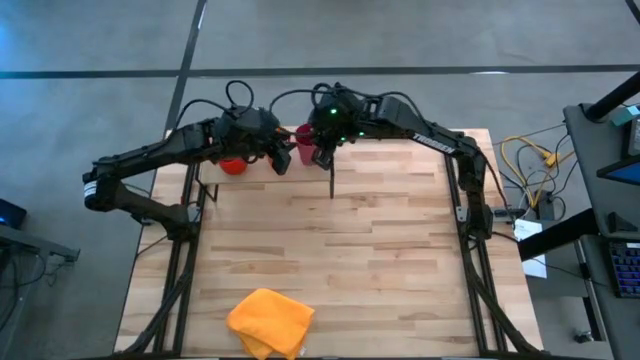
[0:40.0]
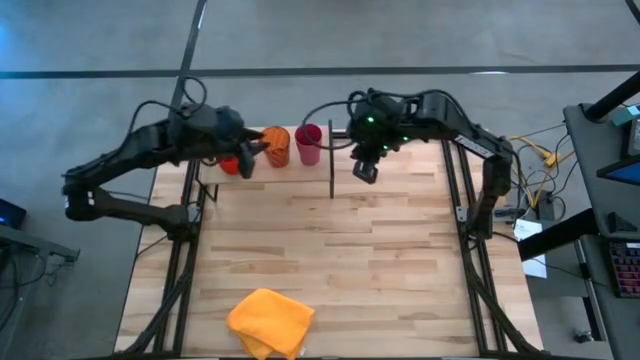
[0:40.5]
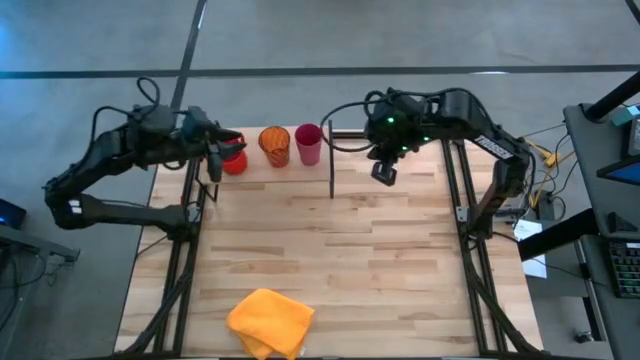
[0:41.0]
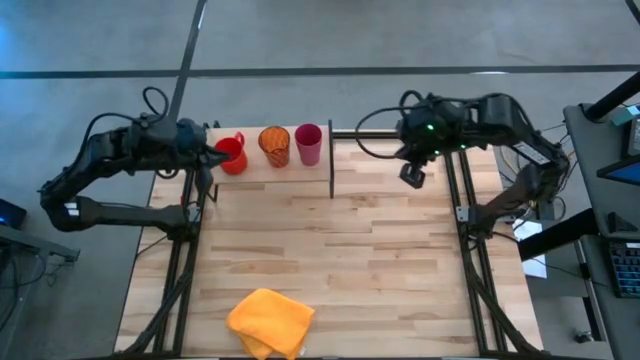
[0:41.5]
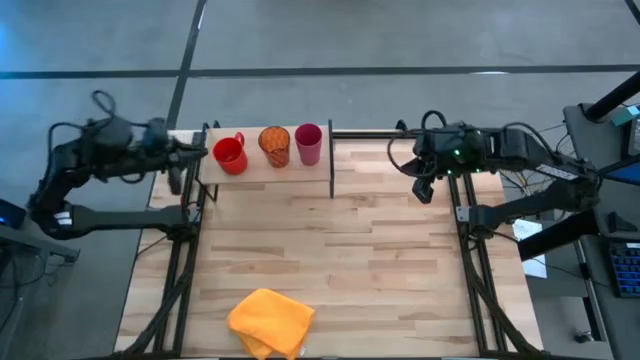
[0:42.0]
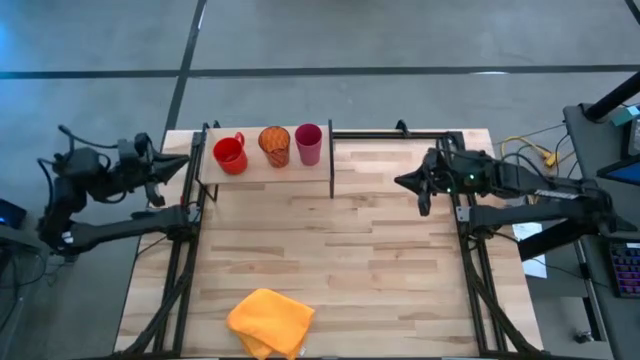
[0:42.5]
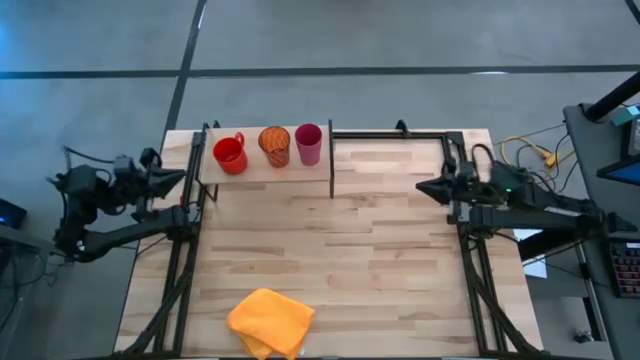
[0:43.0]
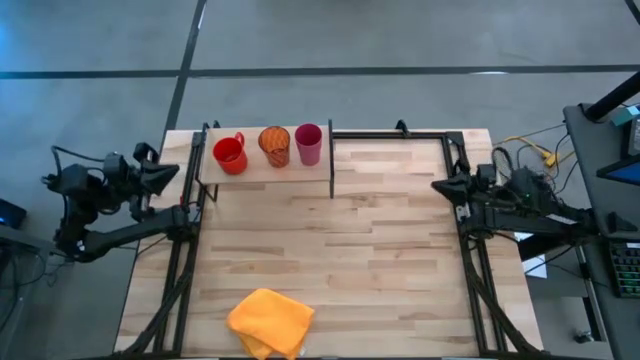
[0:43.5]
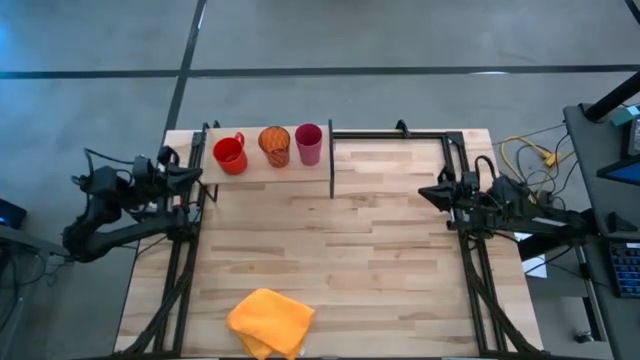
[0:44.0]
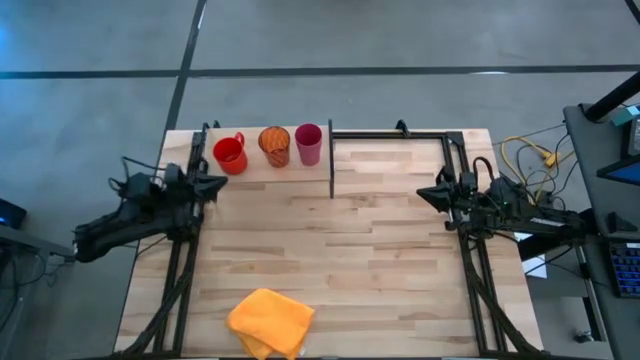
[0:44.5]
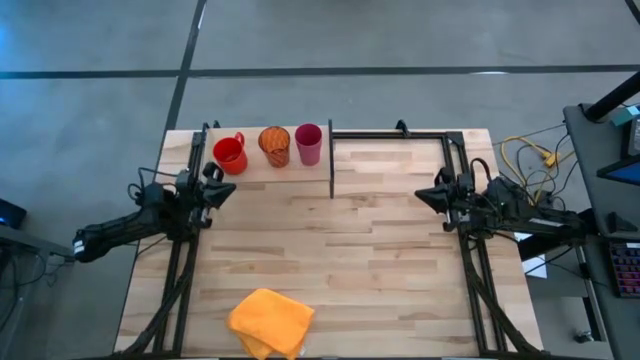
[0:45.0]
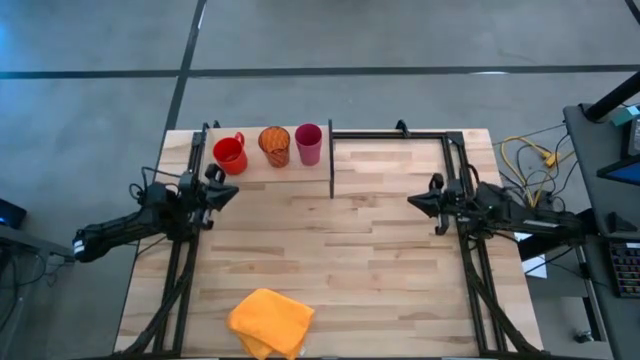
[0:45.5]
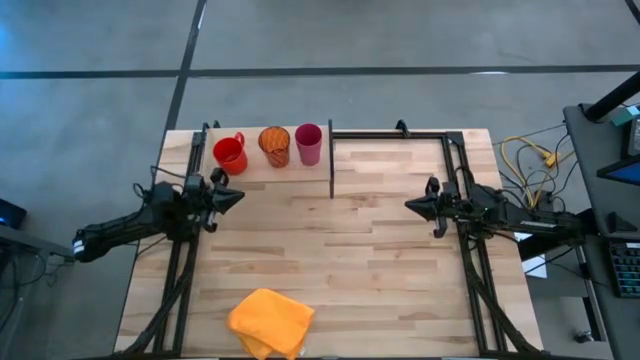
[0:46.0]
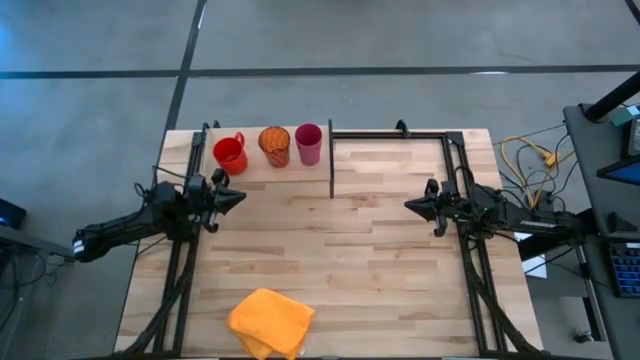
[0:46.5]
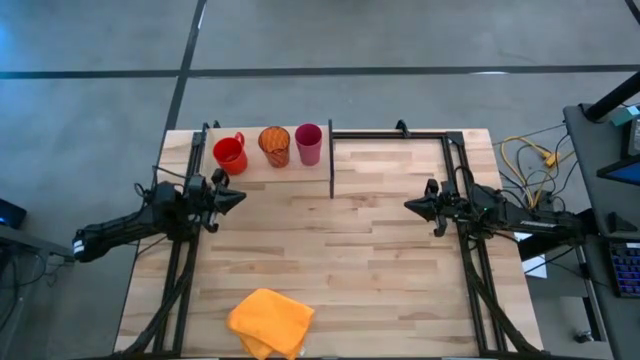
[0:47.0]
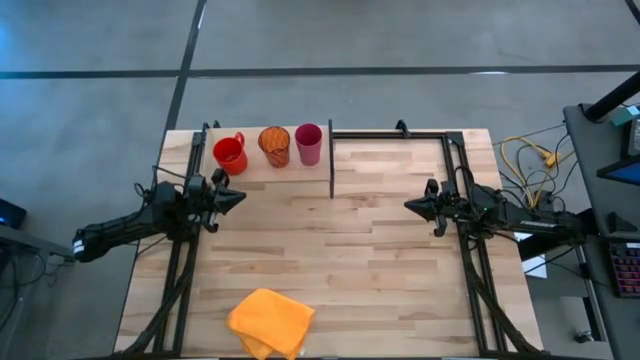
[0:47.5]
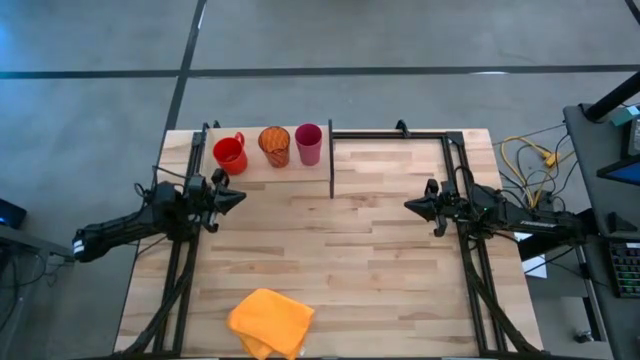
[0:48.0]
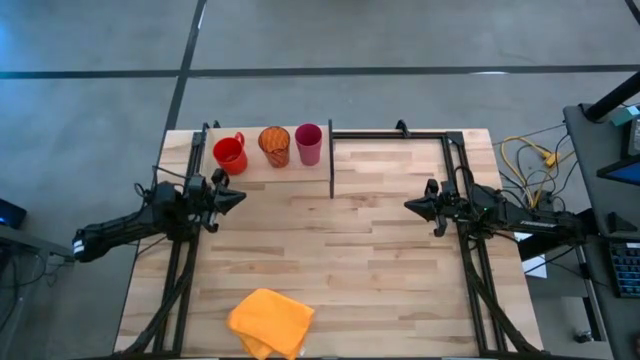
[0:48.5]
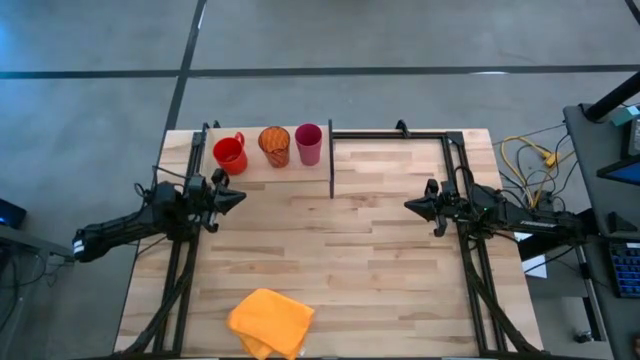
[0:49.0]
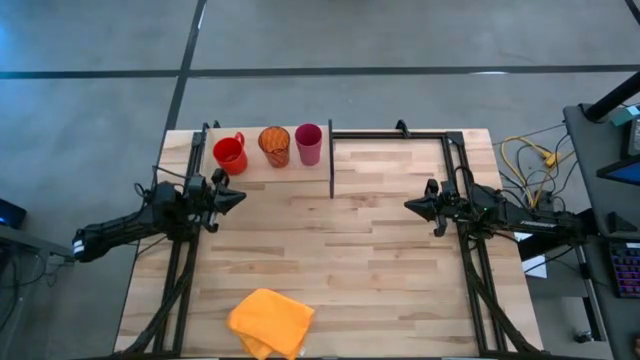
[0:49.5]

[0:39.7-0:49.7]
Task: Stack small to large cups/mugs on shelf
Return to Home Position

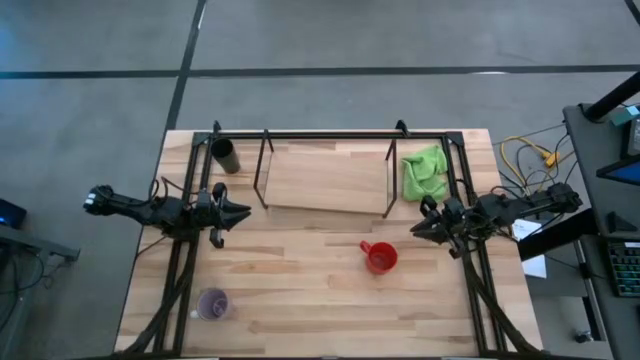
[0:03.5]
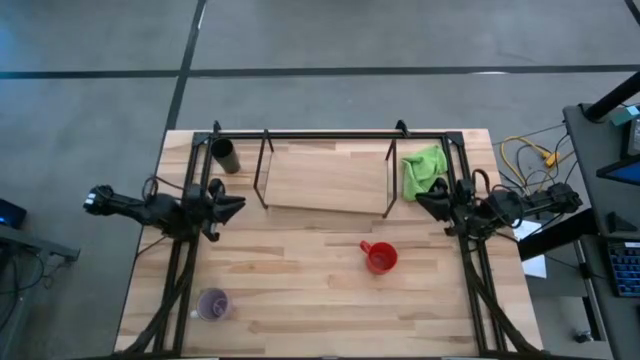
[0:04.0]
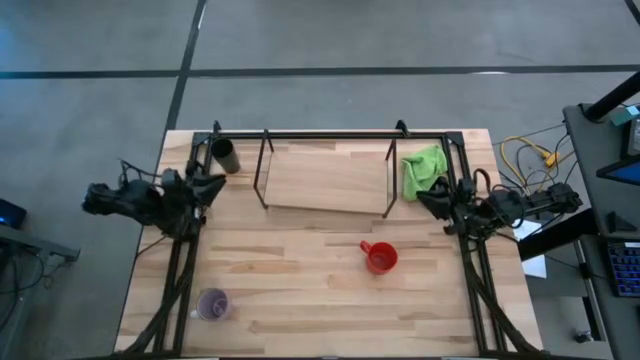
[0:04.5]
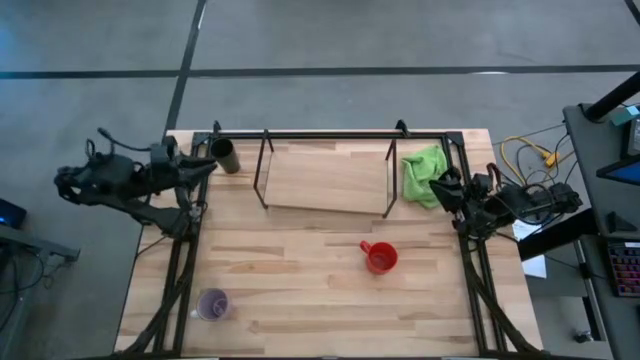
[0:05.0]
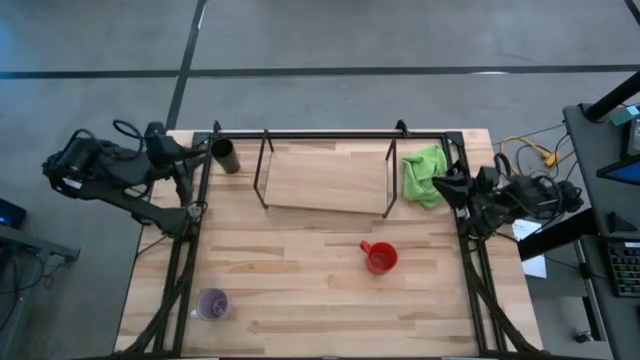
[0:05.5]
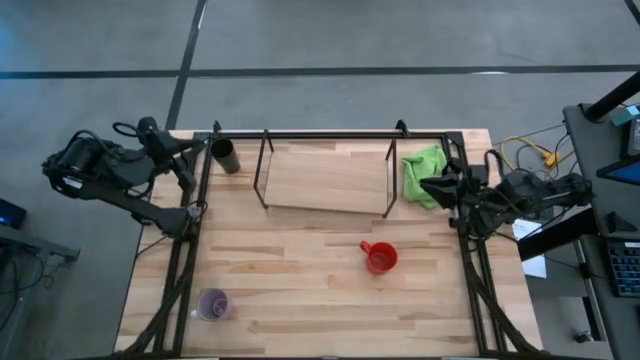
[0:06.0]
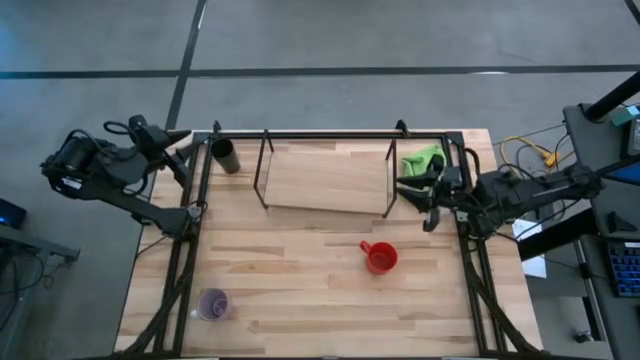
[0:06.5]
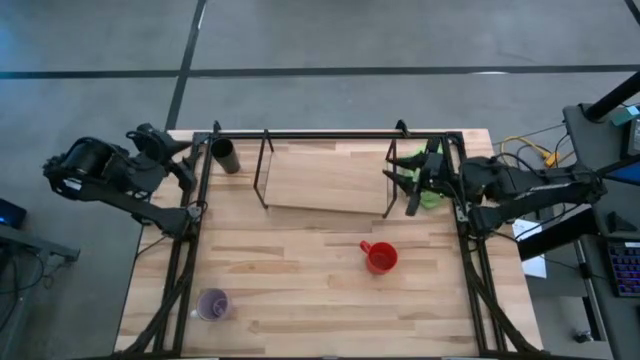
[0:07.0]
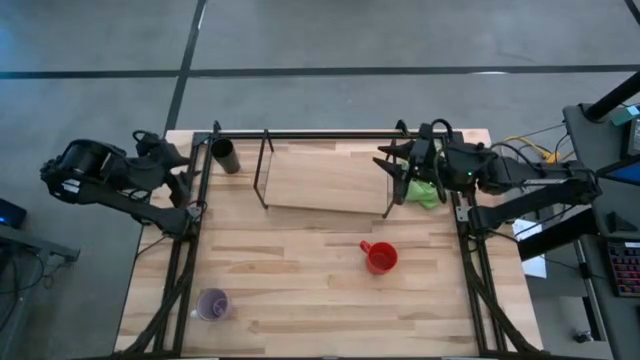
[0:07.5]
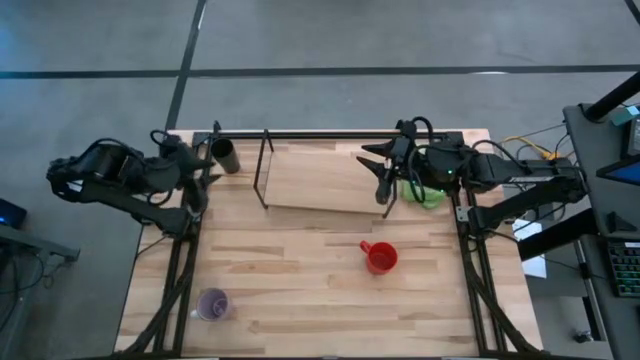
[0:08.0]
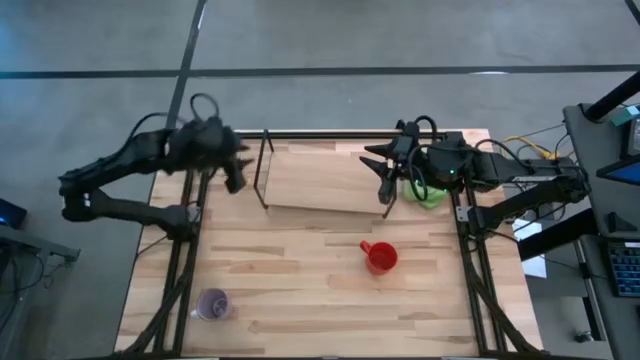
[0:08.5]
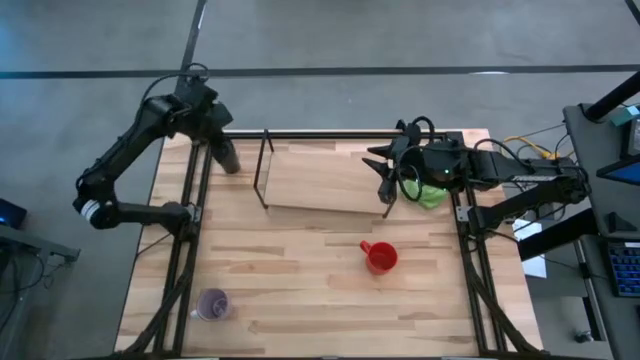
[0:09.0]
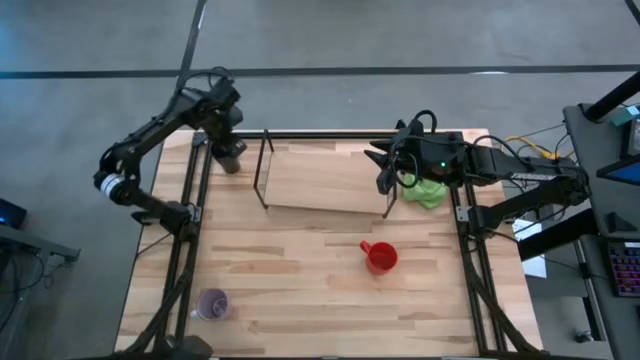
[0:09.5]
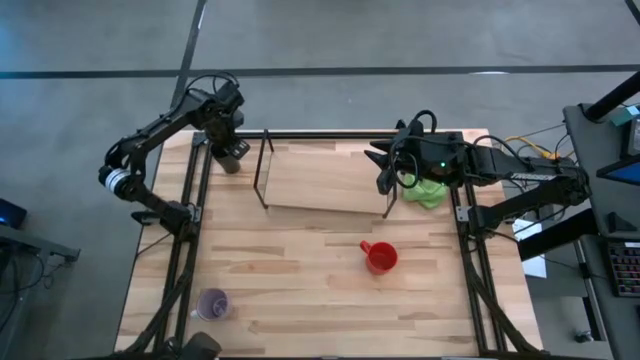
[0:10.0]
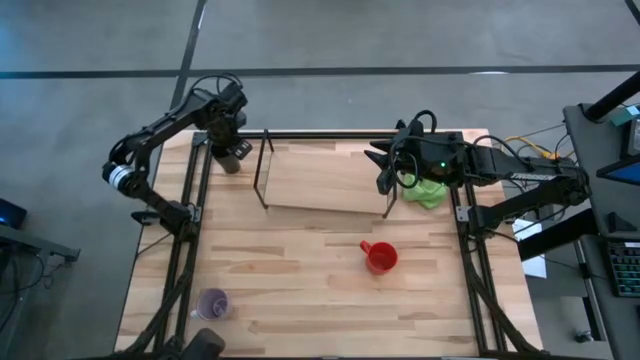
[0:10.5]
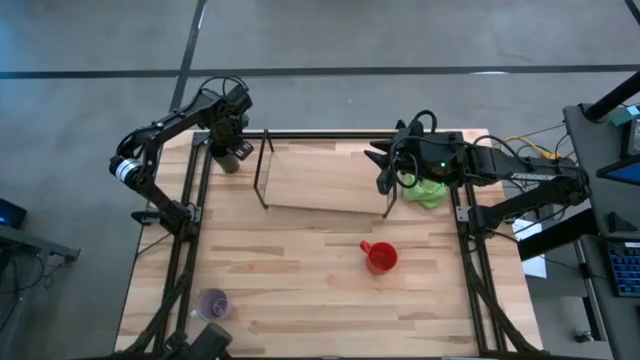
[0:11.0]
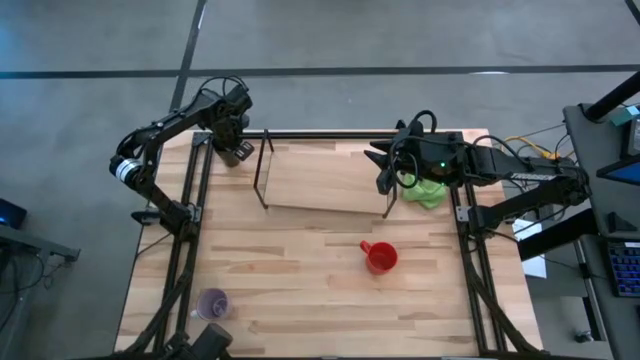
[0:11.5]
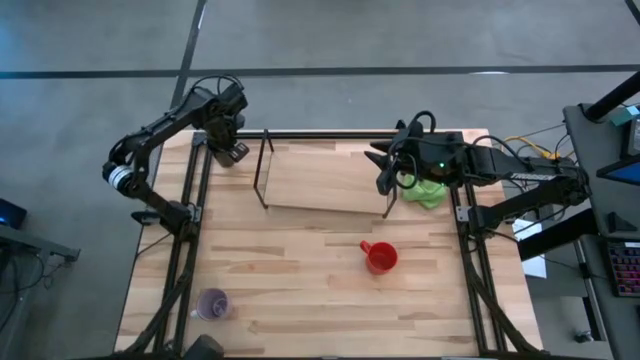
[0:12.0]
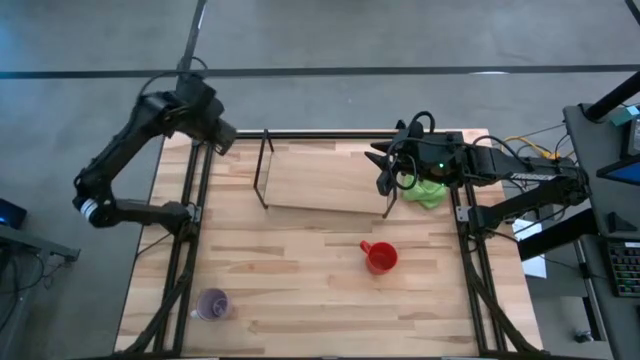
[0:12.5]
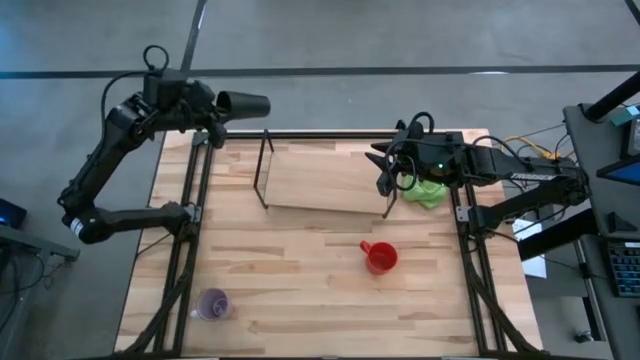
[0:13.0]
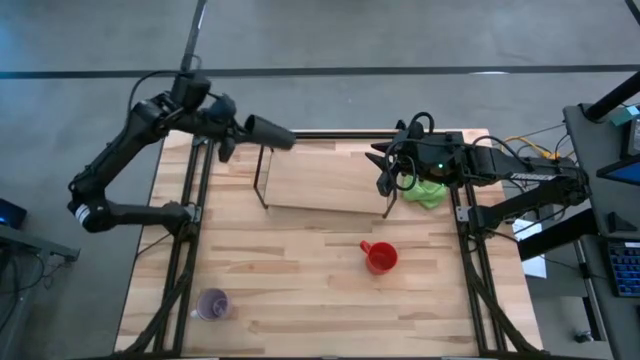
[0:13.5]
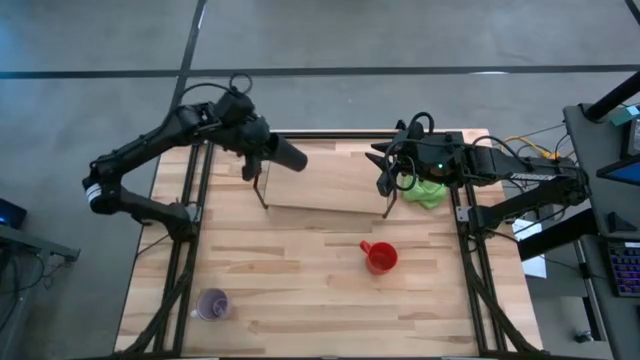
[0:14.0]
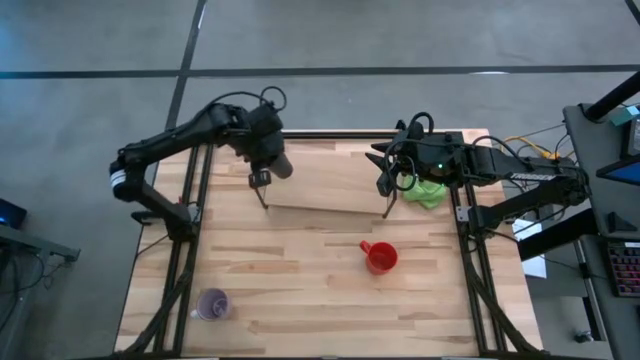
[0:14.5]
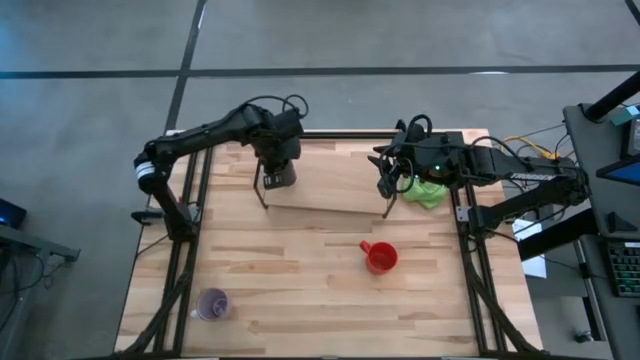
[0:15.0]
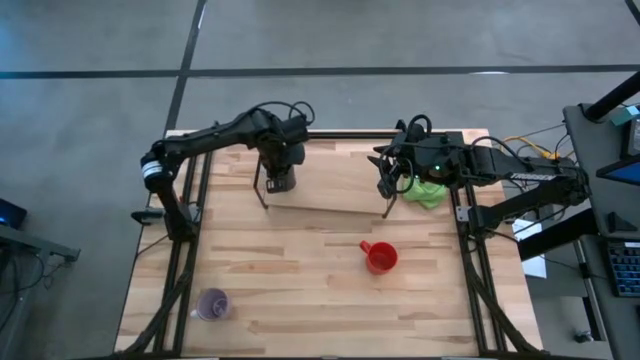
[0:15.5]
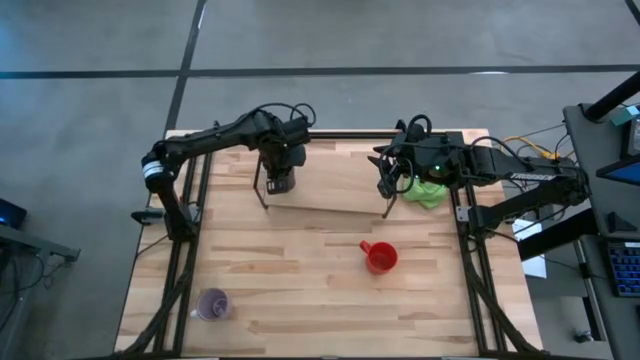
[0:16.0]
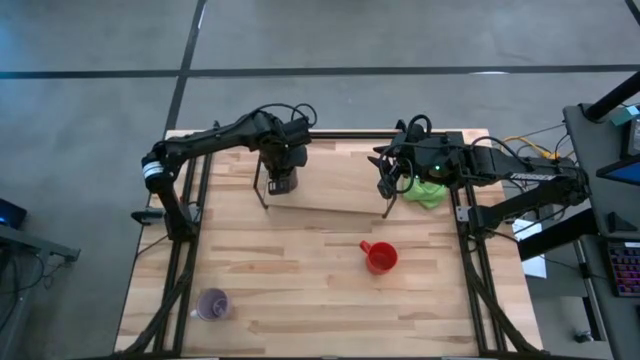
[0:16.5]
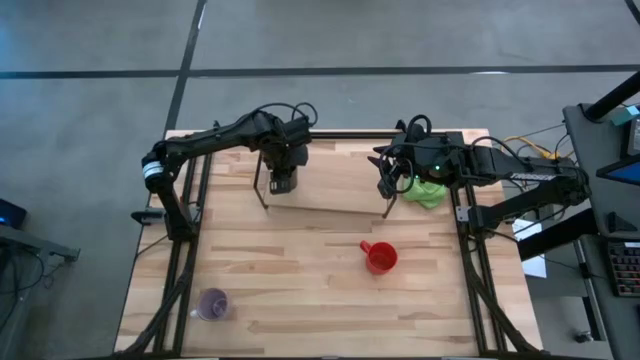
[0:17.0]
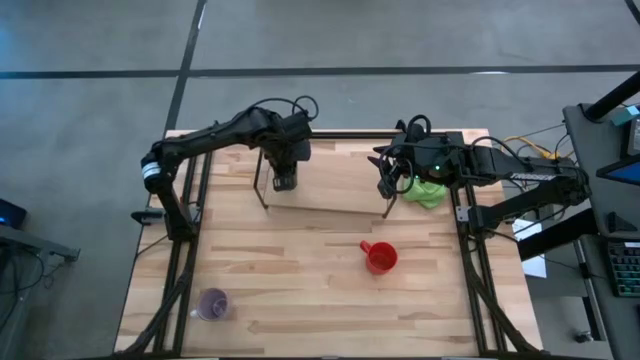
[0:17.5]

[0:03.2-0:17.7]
Task: Stack small to large cups/mugs on shelf
Put the black cup on the shelf
